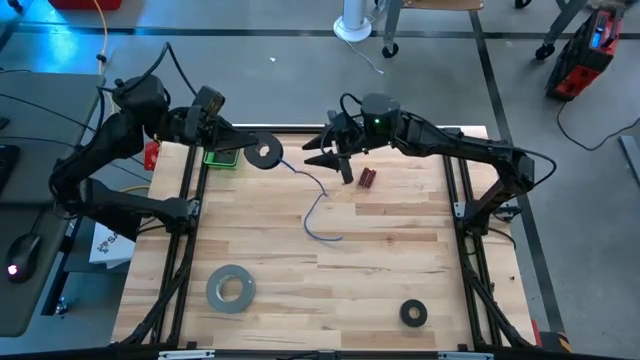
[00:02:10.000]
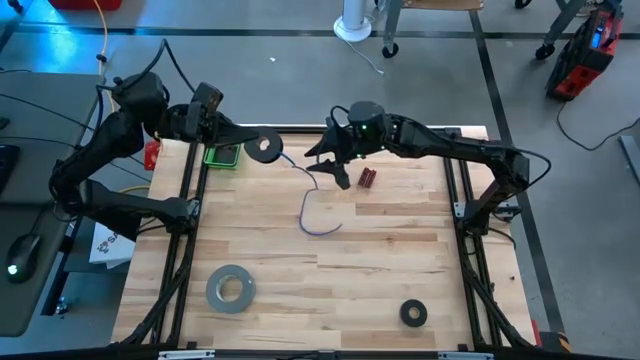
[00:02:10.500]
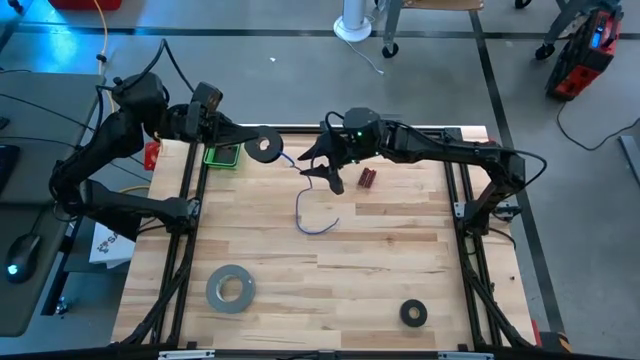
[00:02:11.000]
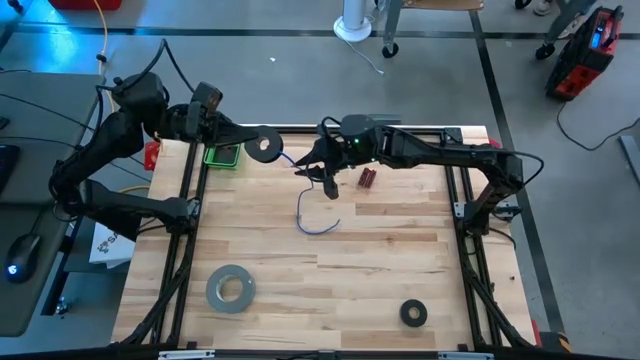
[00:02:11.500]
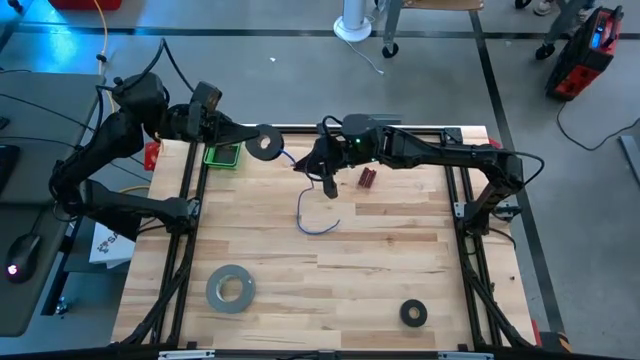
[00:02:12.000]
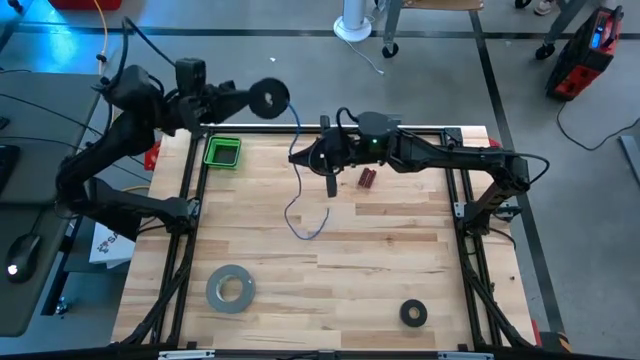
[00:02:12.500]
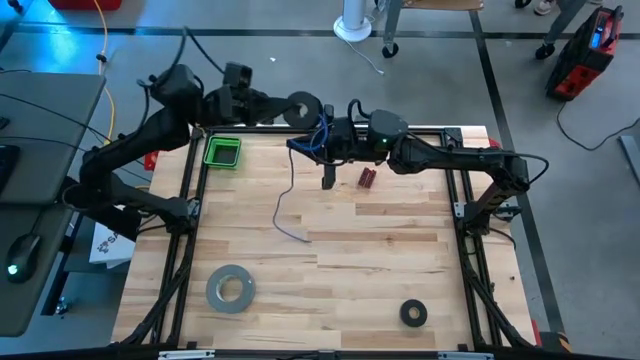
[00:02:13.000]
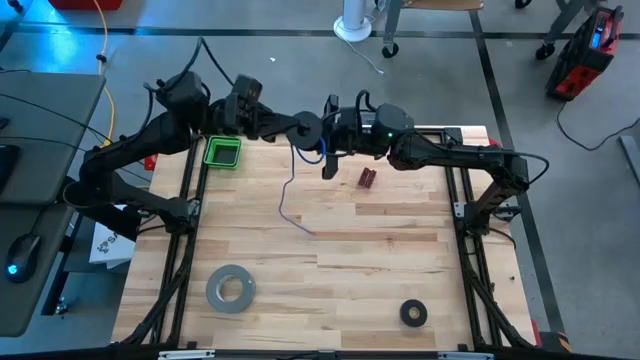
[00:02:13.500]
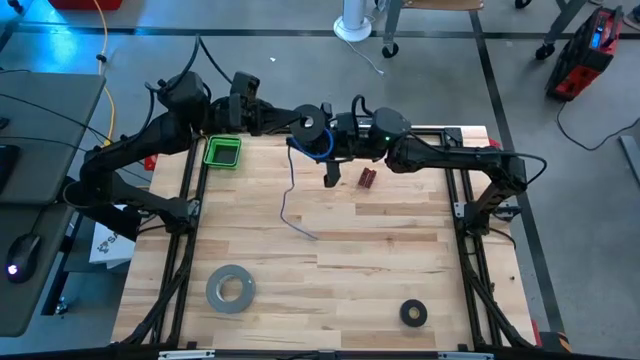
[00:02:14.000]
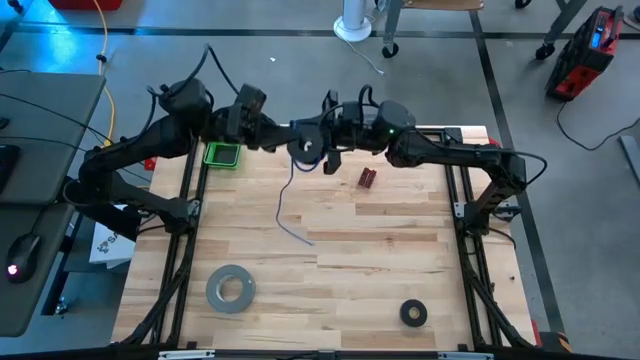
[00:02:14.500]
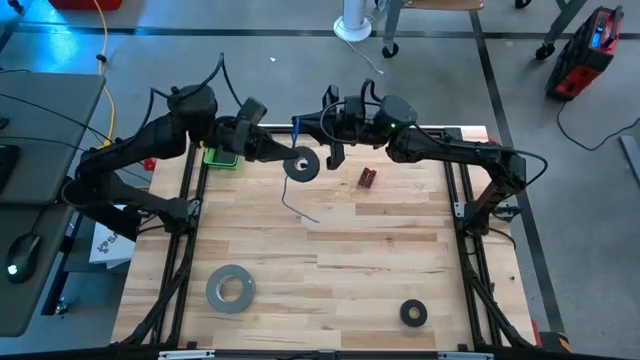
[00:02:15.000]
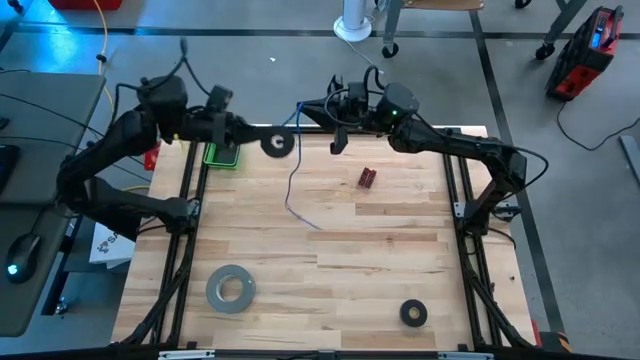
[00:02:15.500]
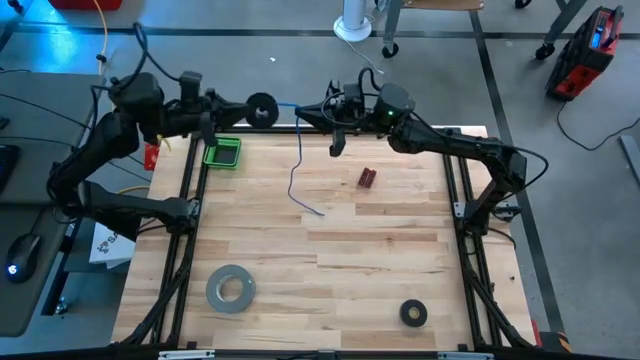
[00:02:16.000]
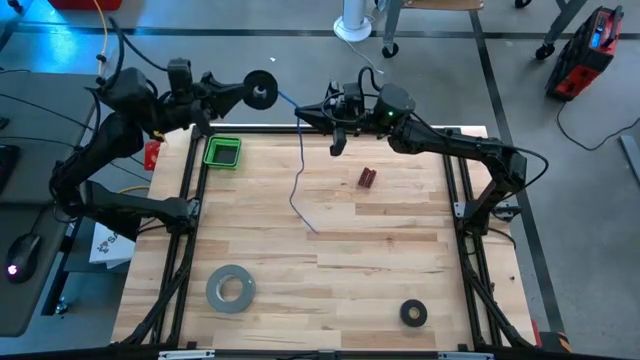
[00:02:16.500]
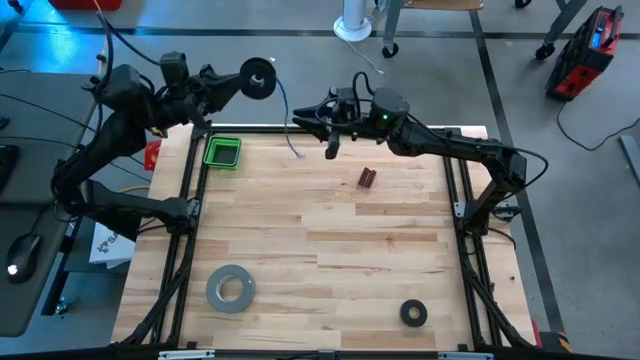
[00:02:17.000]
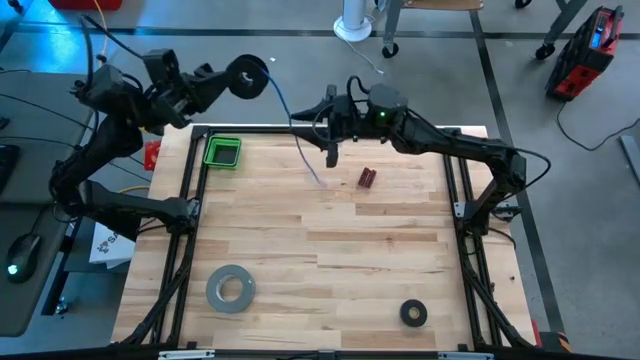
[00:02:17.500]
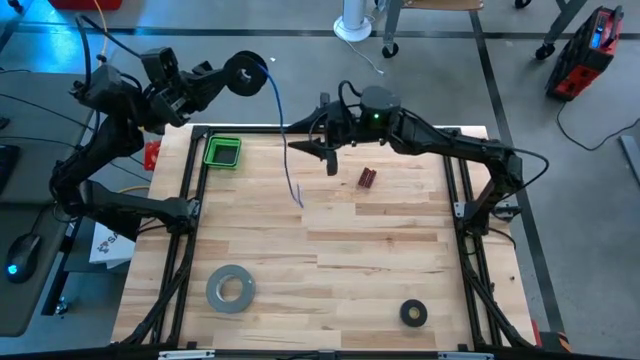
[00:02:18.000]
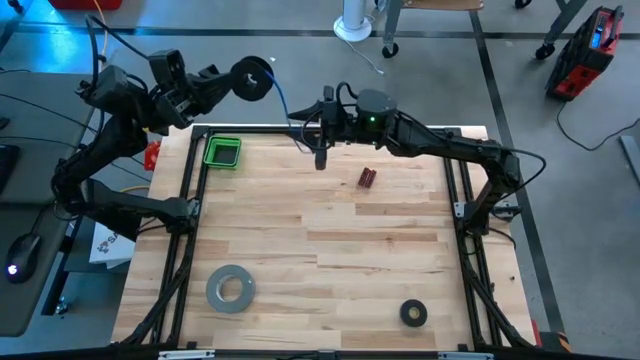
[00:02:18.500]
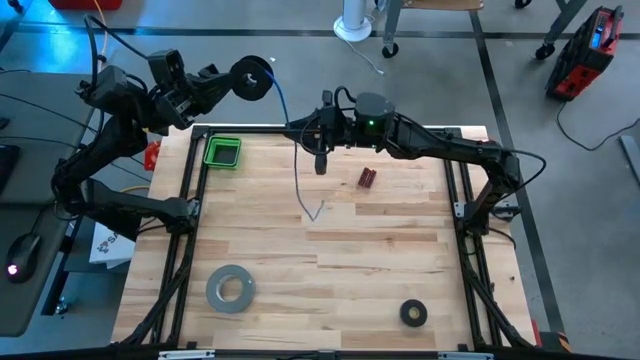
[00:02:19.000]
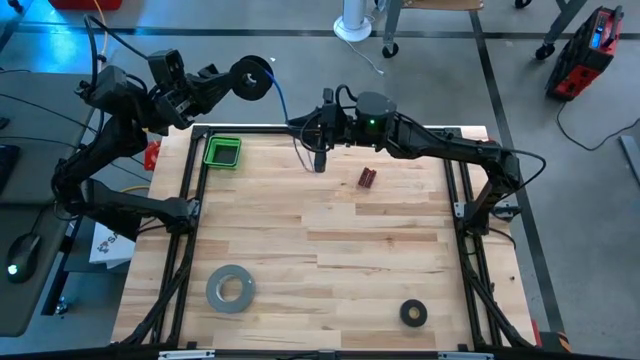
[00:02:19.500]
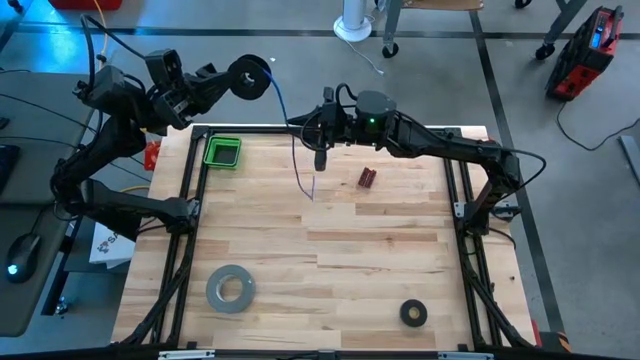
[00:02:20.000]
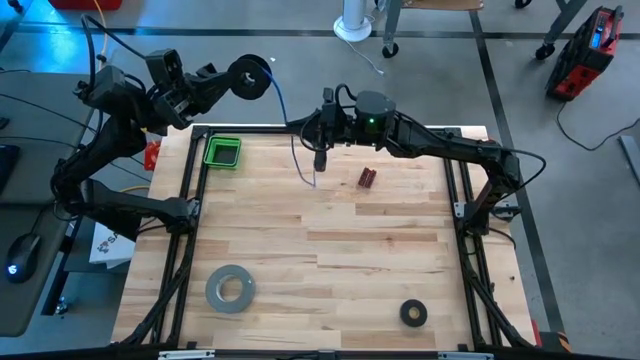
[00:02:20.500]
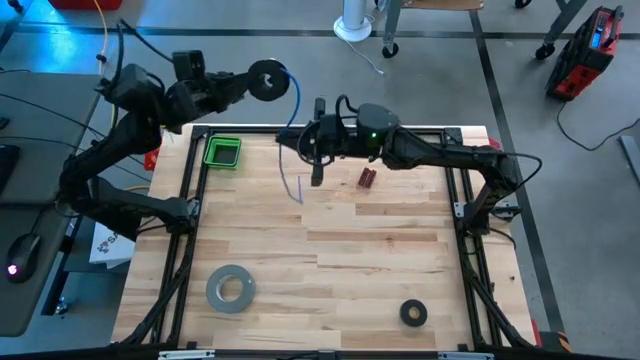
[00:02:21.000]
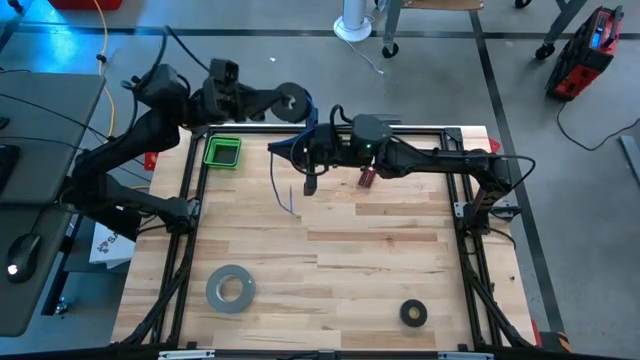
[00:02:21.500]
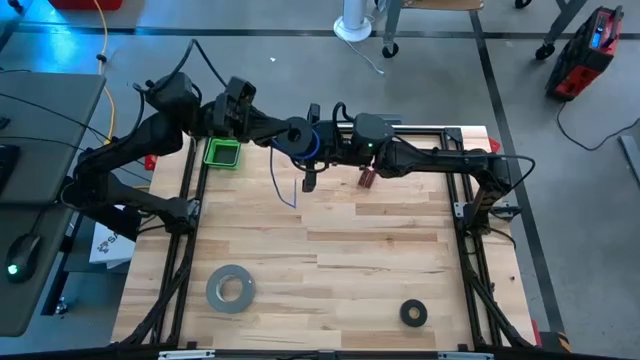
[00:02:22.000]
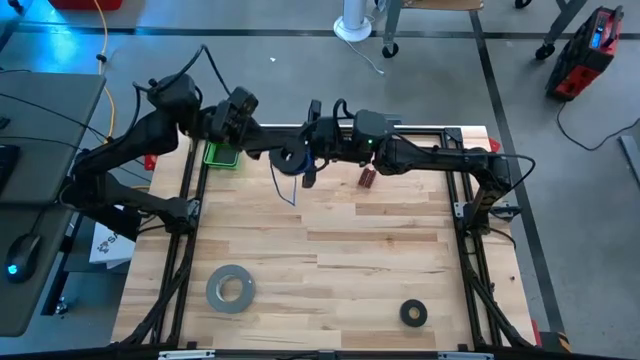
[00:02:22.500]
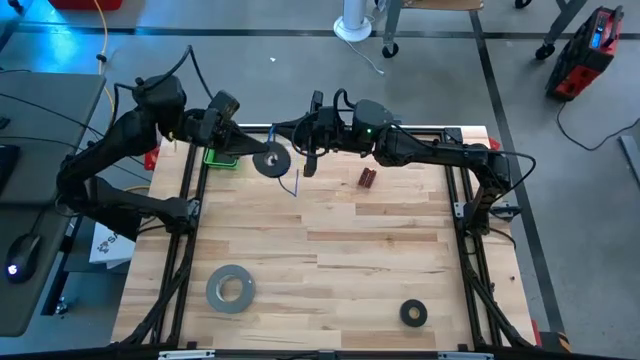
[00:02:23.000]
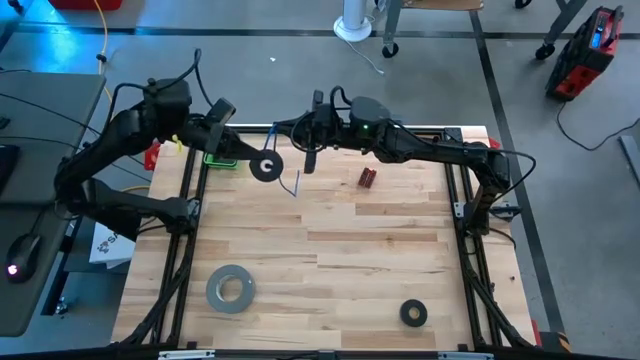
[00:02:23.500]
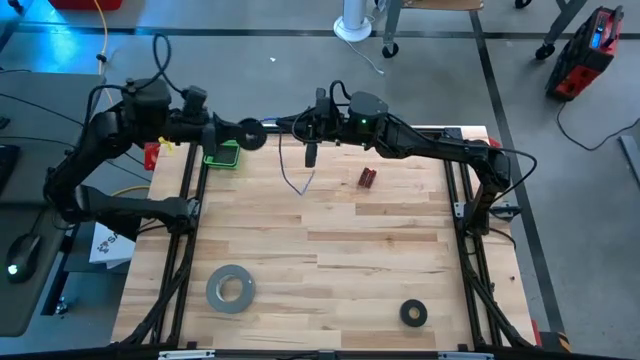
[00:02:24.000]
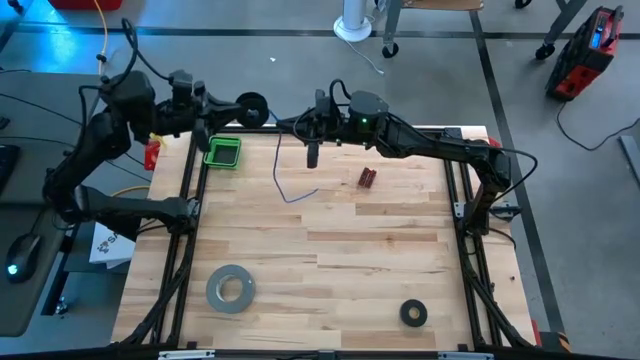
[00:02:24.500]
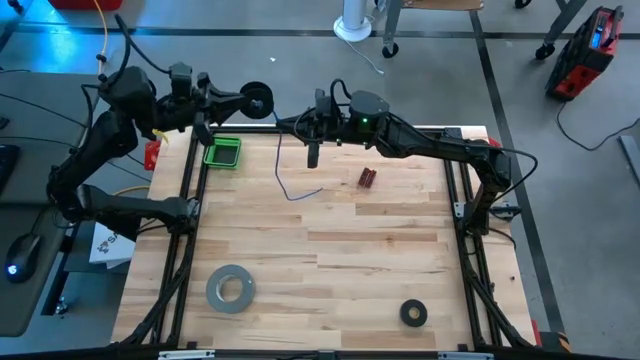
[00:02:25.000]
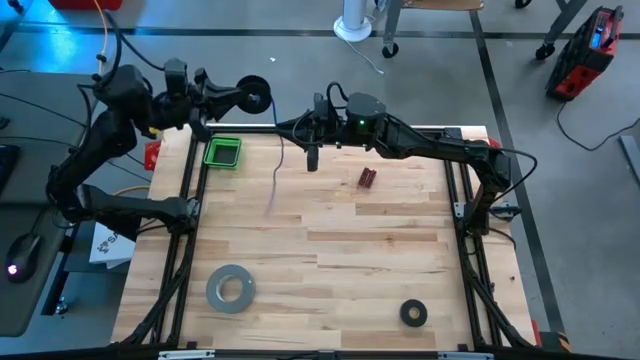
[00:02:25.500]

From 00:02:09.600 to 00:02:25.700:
Task: Coil cords
Coil the blue wire onto the spool

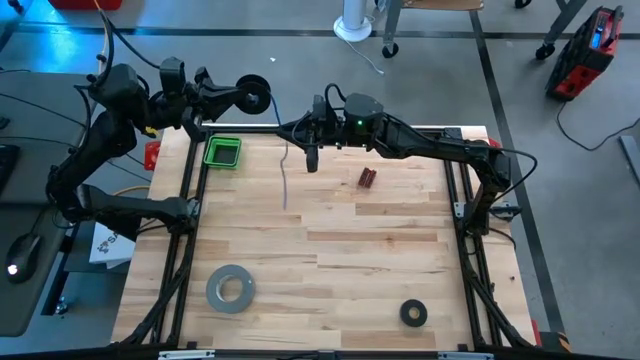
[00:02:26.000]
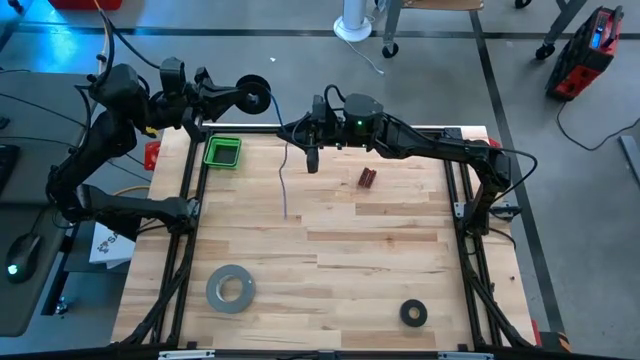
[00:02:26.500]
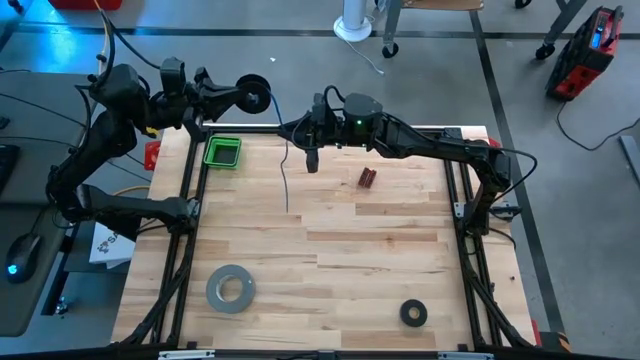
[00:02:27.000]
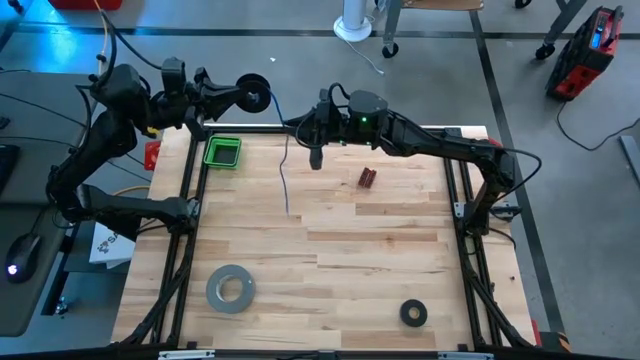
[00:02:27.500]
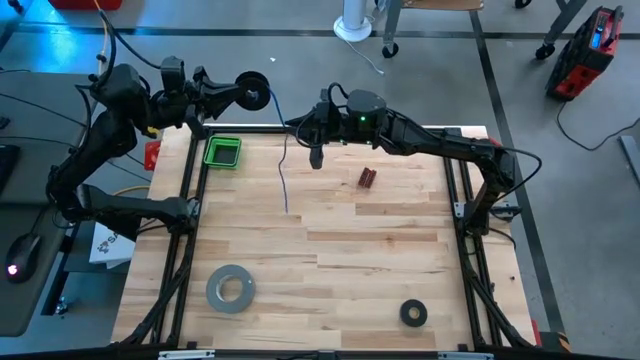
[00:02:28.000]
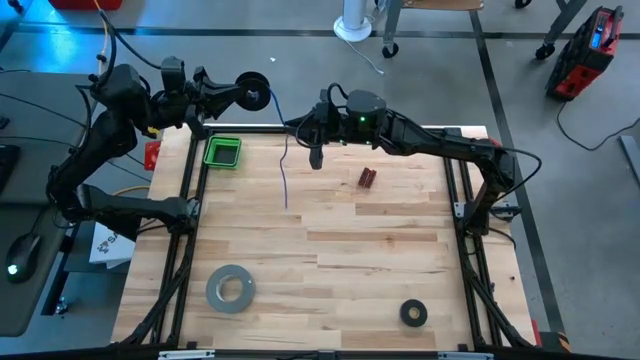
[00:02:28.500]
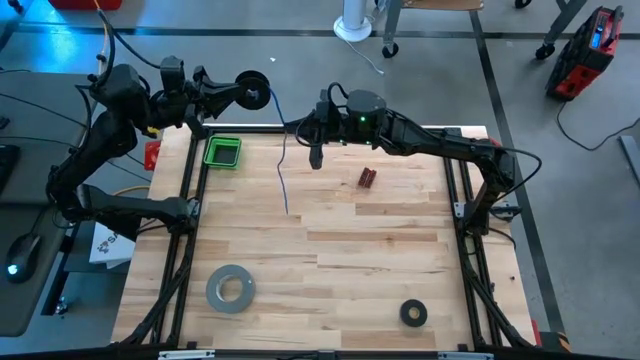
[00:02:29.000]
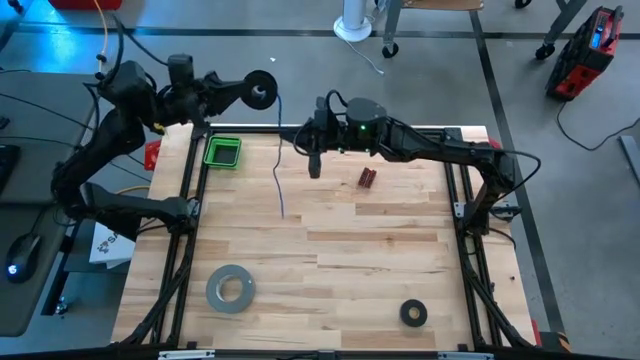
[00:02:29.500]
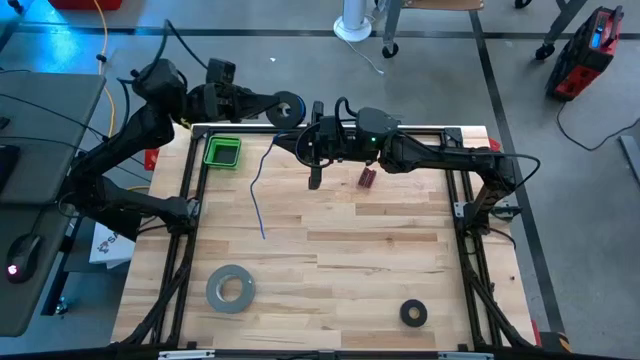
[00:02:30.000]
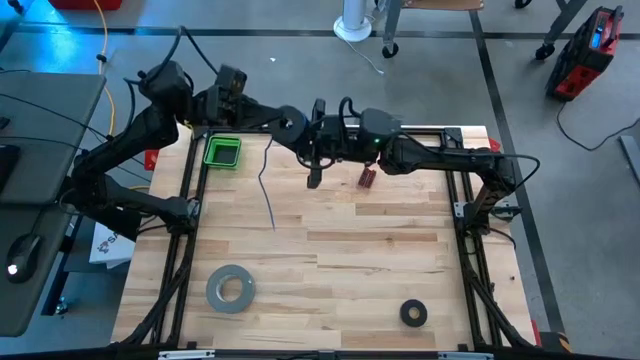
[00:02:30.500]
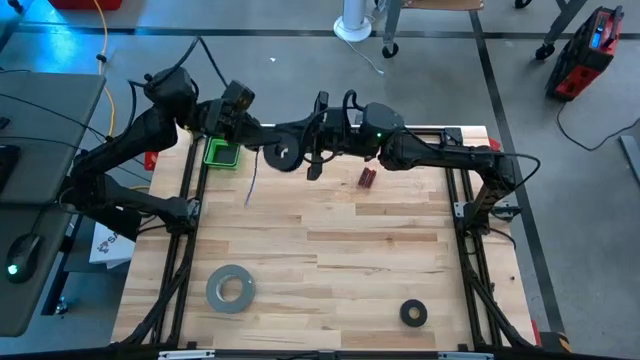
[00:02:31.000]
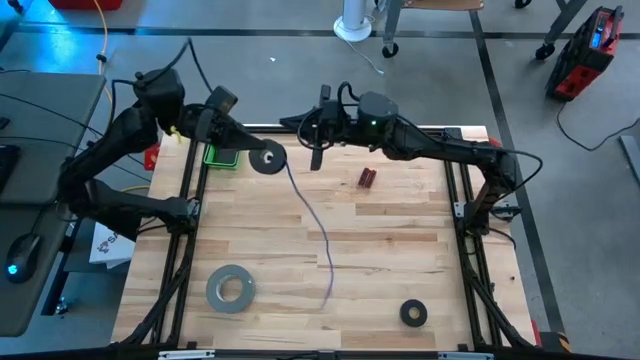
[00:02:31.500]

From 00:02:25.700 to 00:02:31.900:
Coil the blue wire onto the spool
